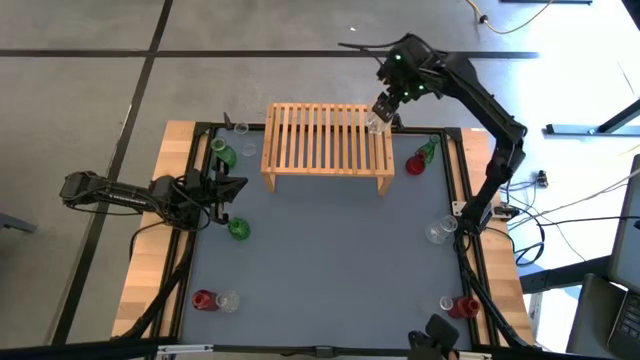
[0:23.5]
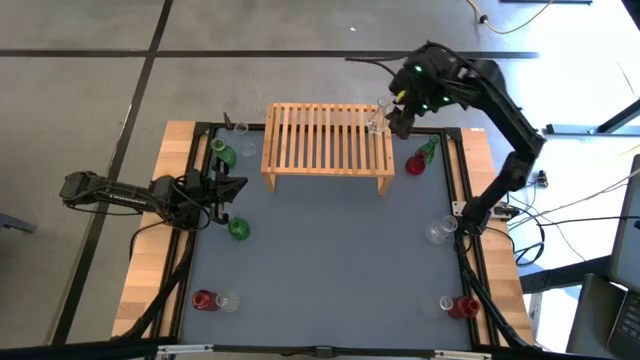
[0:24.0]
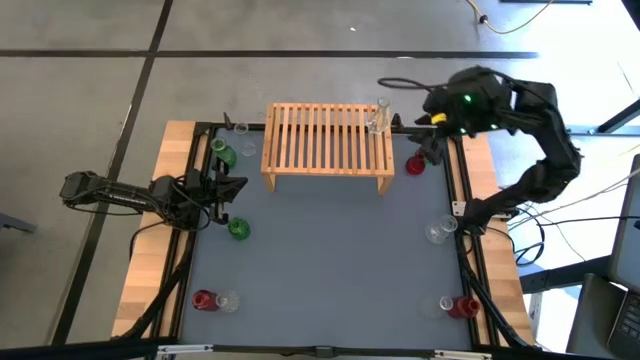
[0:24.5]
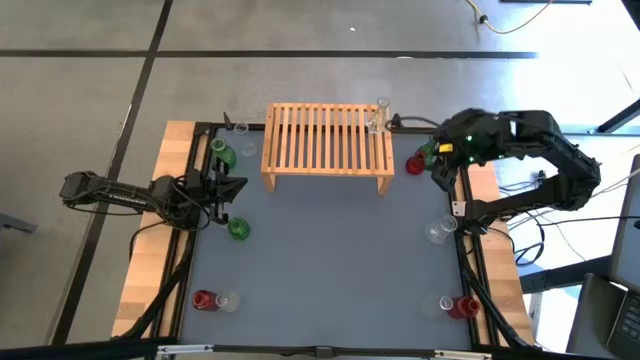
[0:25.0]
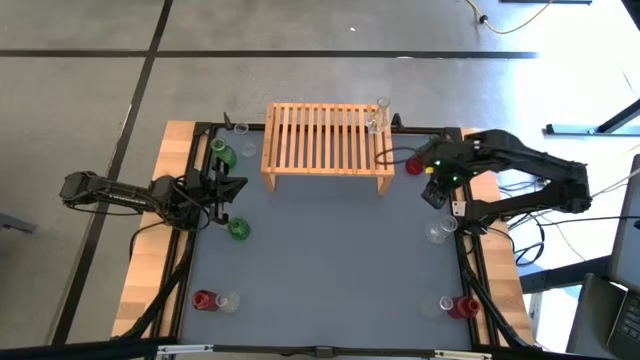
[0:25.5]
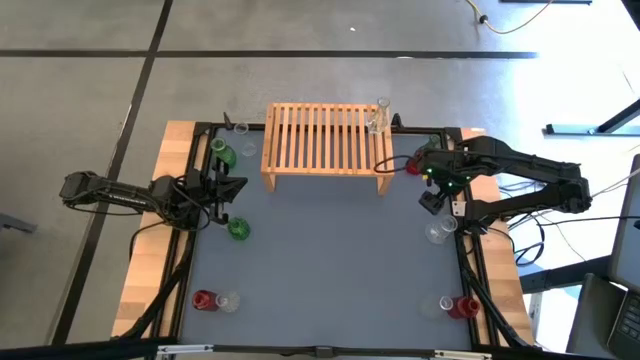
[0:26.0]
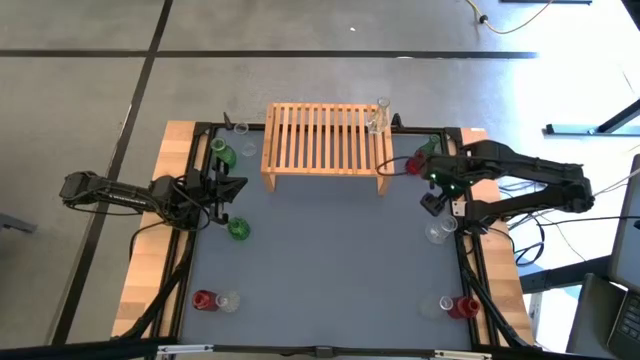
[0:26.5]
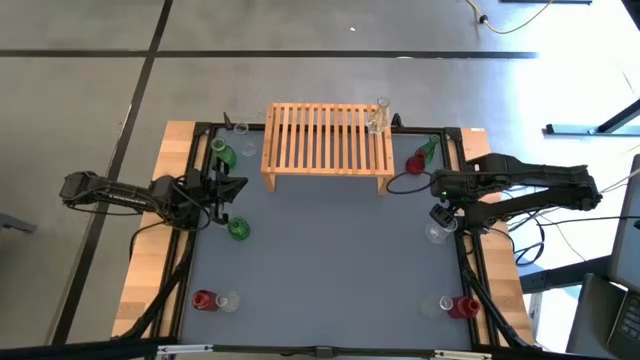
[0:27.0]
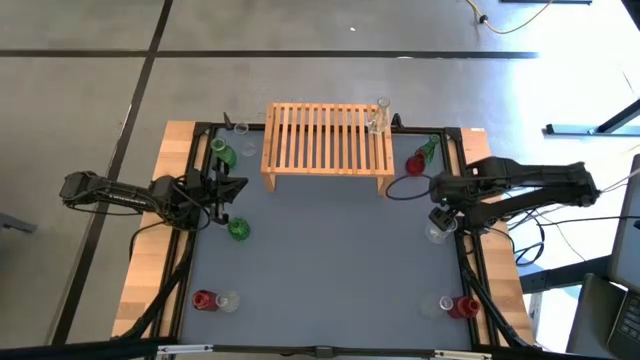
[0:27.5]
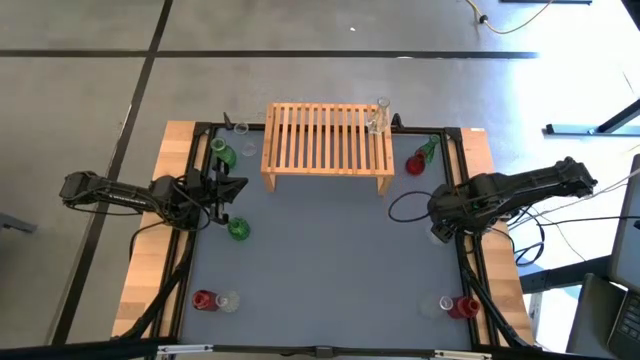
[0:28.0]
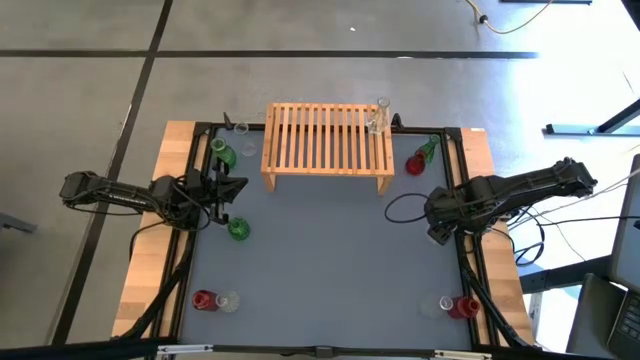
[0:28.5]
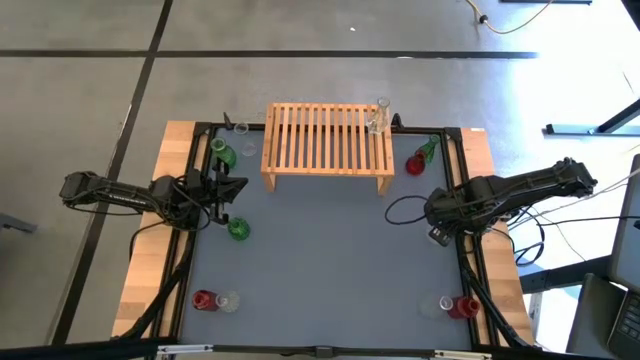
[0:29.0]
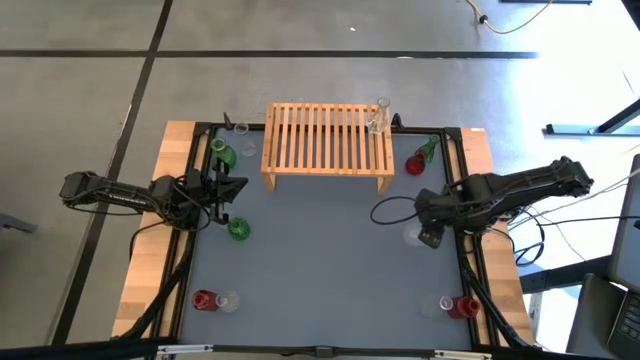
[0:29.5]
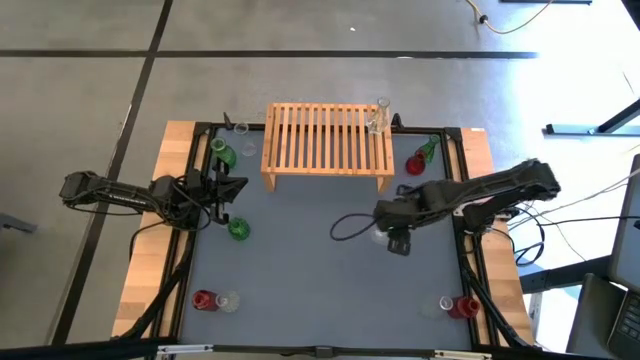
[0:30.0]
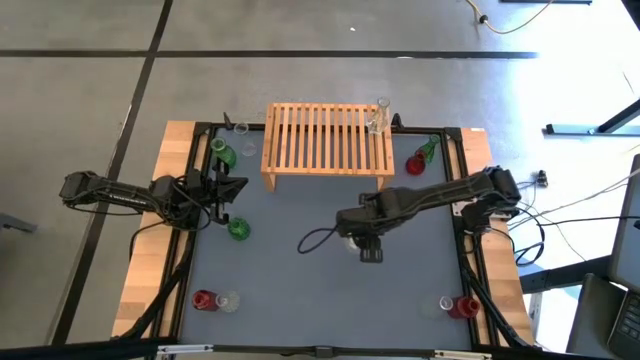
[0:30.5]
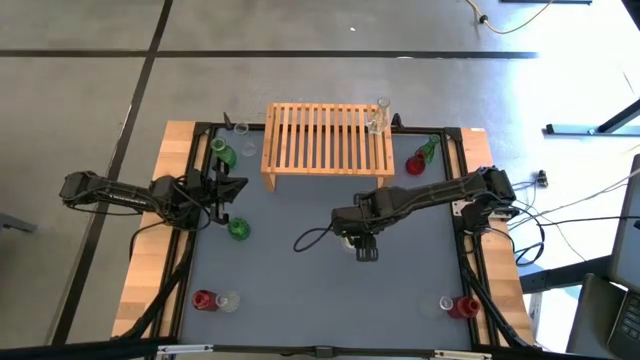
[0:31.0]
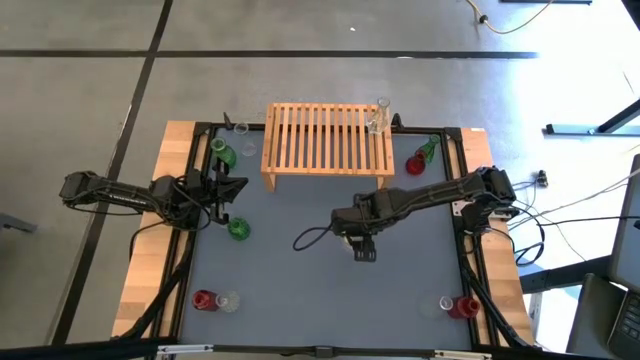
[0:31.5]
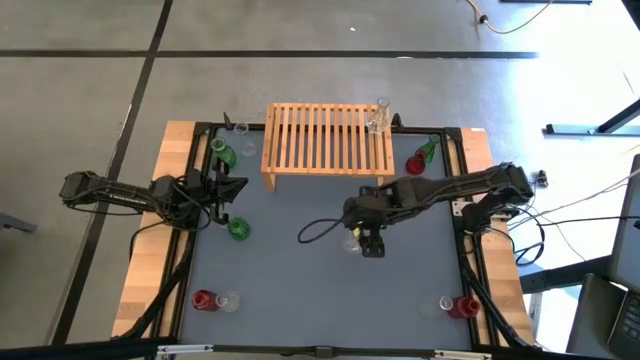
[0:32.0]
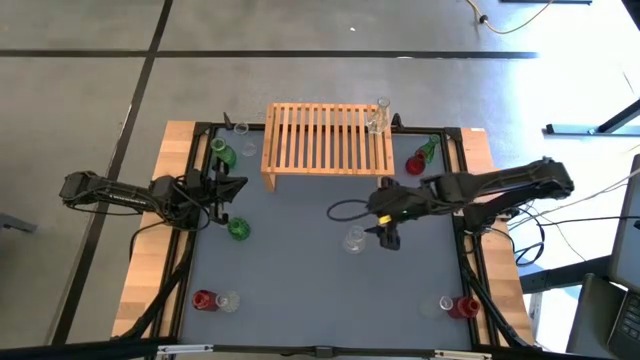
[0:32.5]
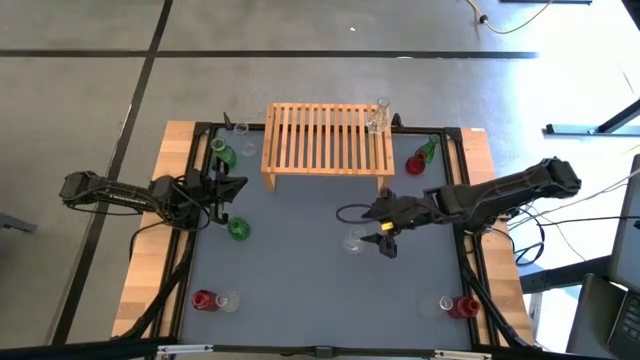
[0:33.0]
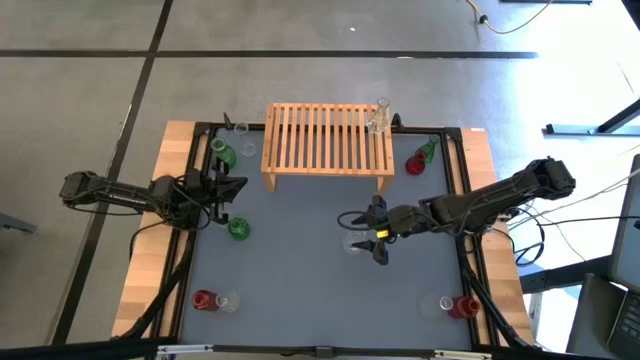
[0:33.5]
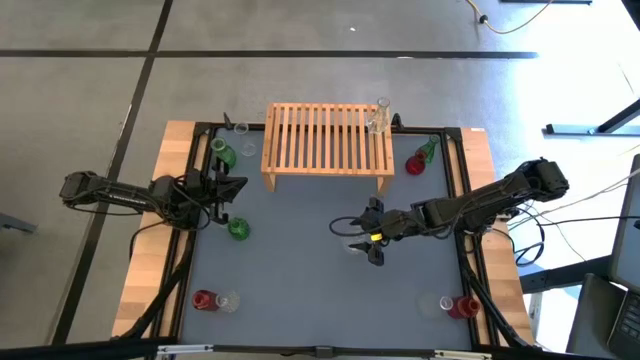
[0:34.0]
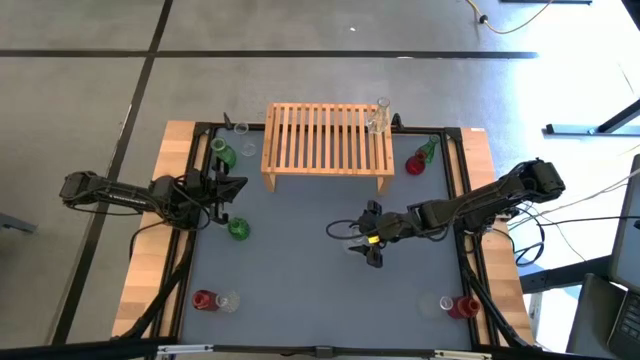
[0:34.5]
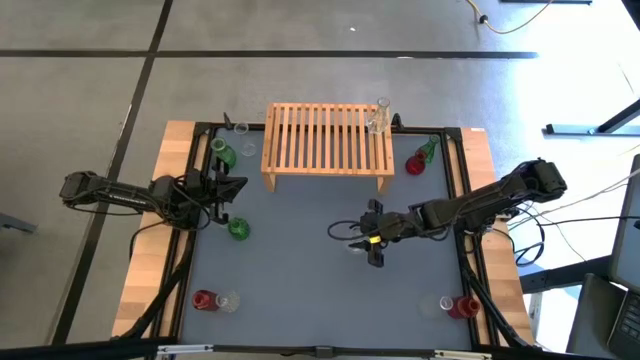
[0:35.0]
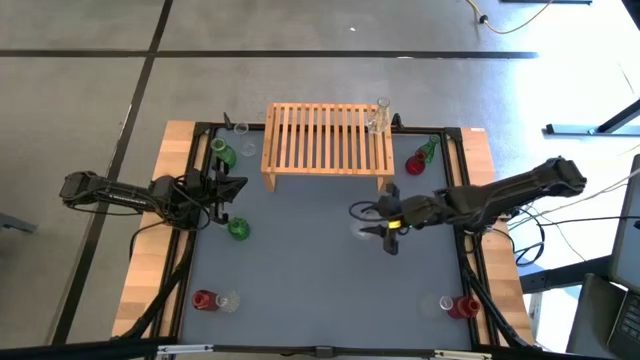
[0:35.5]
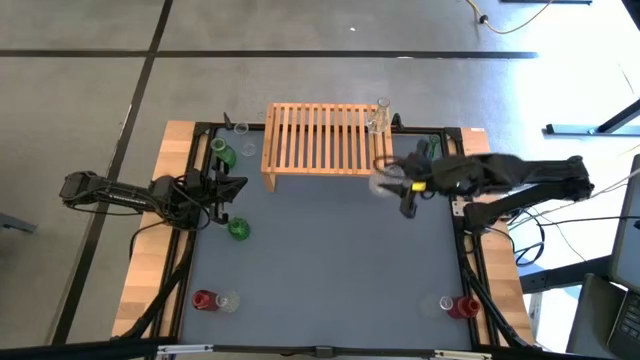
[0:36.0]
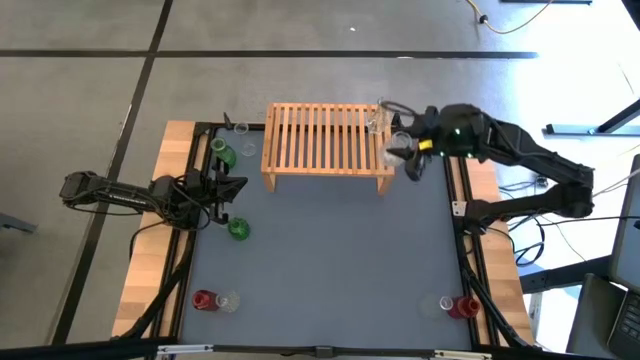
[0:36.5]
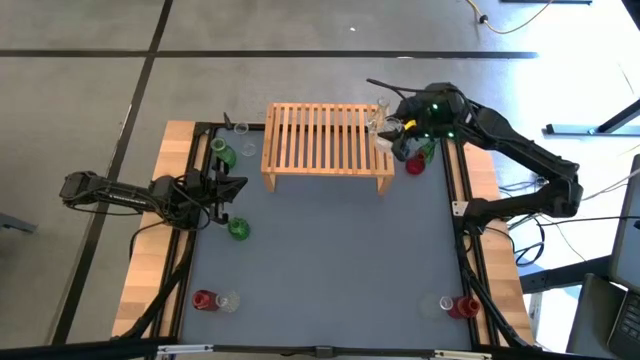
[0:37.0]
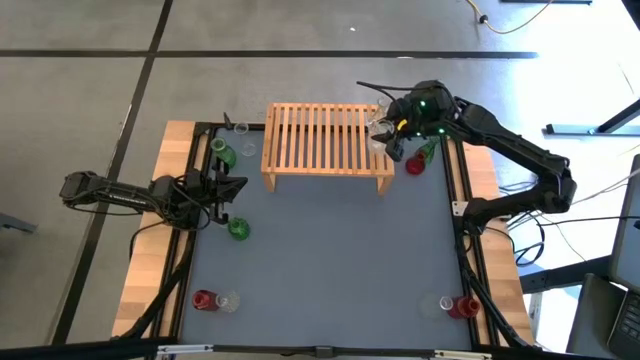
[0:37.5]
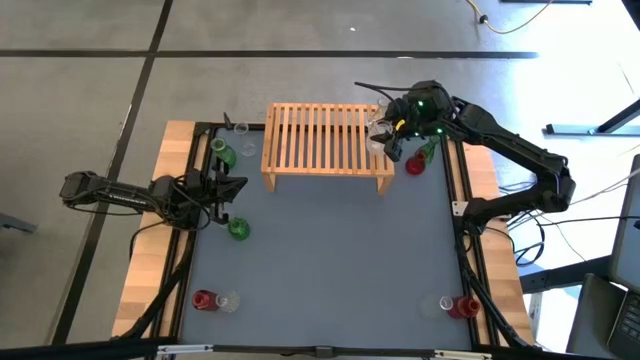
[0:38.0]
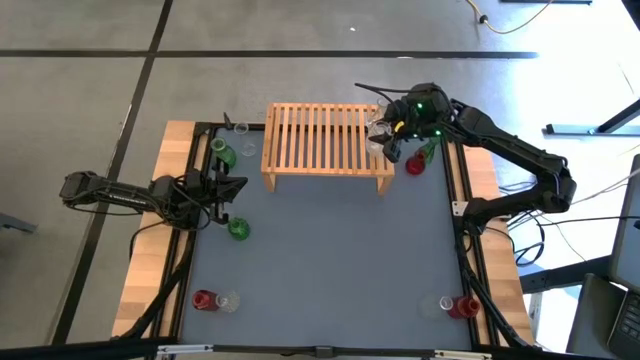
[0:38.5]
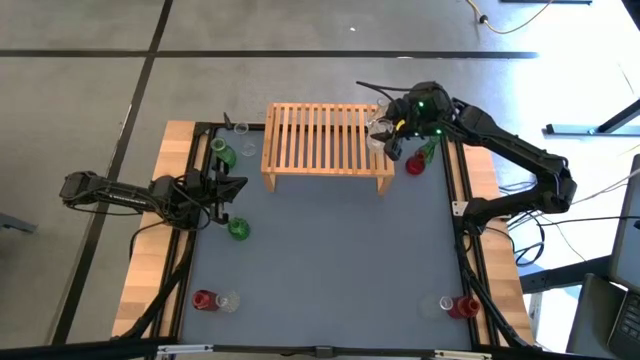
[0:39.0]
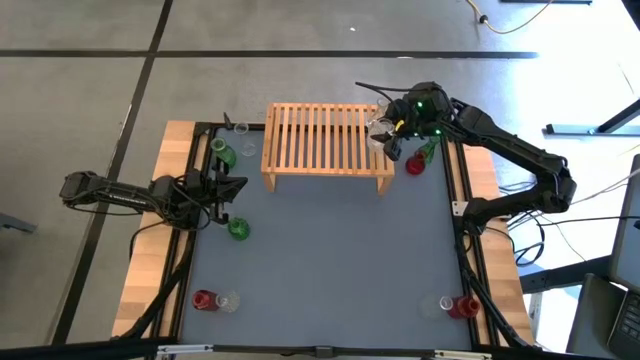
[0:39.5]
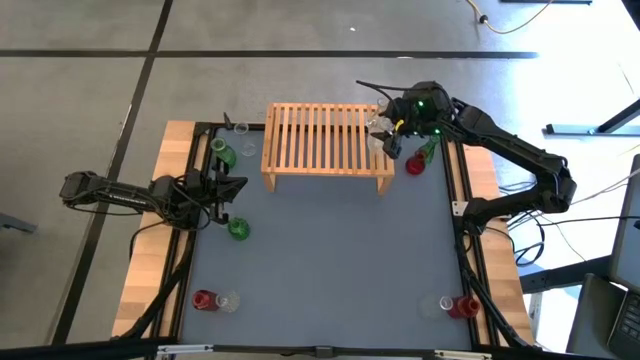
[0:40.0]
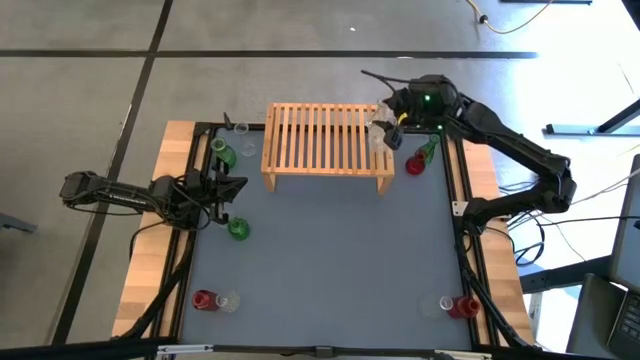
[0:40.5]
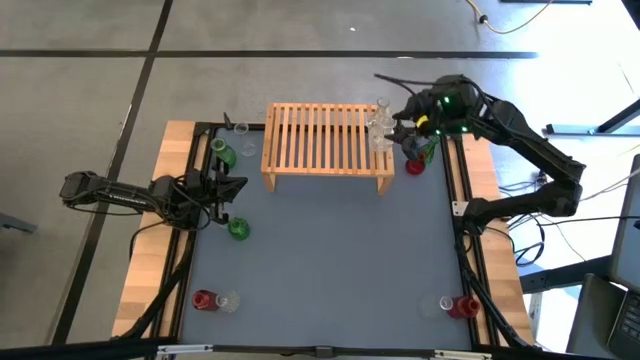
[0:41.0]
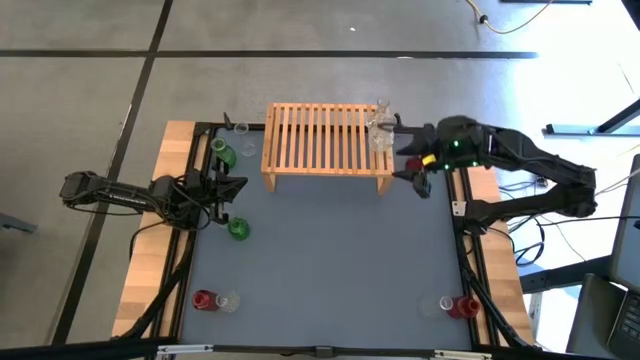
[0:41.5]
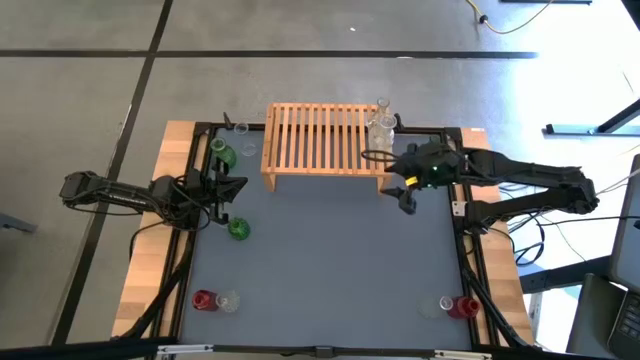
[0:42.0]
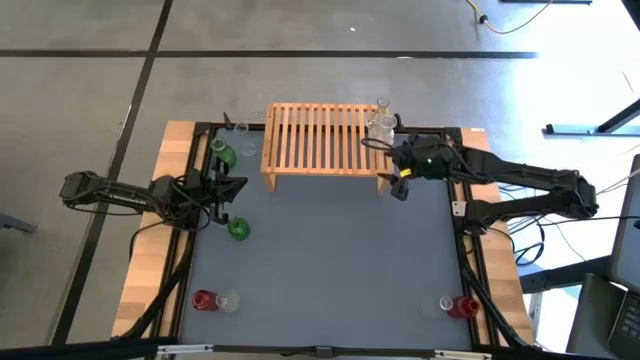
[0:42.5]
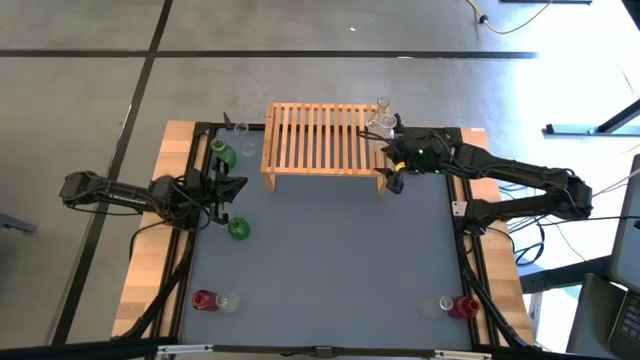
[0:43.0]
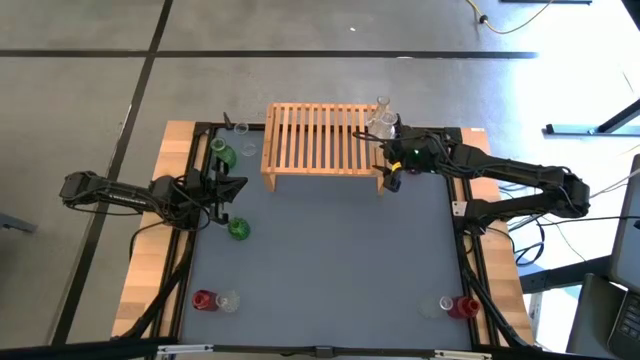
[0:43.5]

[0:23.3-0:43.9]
Task: sort vases onto shelf
Put the transparent vase on the shelf aligned with the other transparent vase
